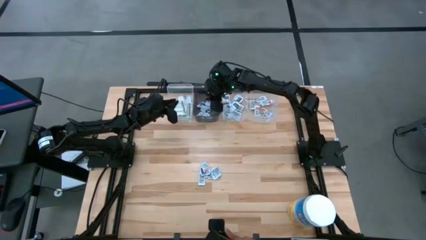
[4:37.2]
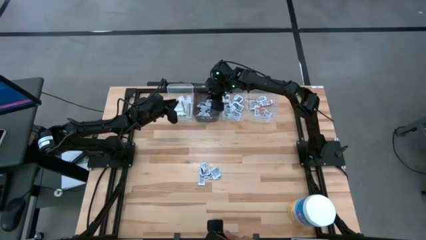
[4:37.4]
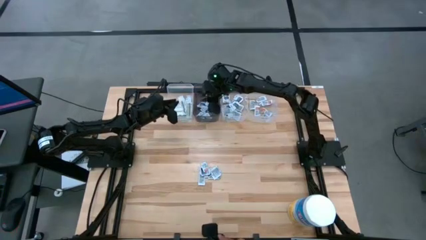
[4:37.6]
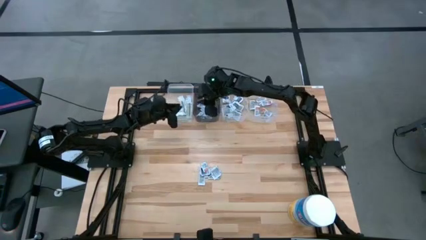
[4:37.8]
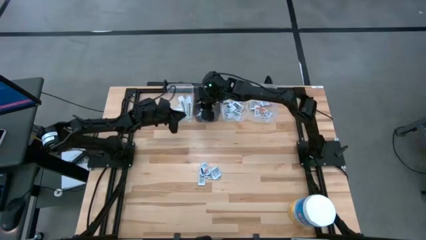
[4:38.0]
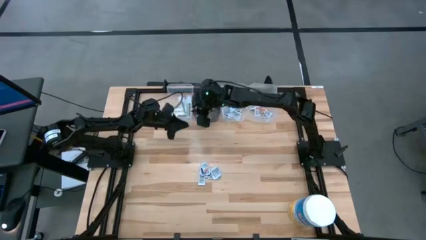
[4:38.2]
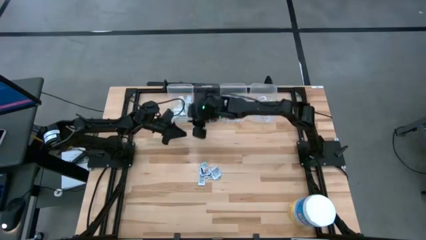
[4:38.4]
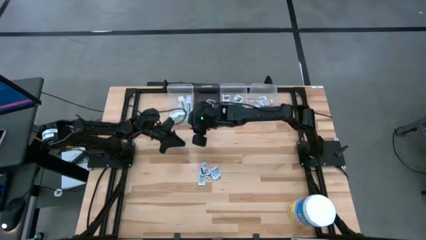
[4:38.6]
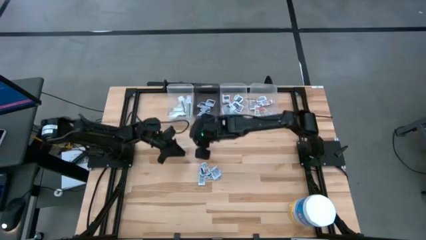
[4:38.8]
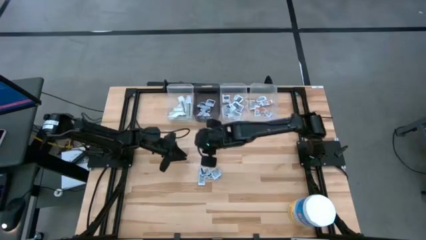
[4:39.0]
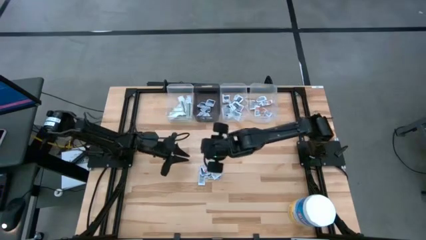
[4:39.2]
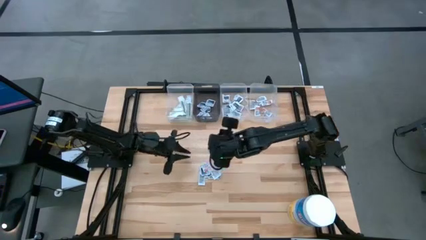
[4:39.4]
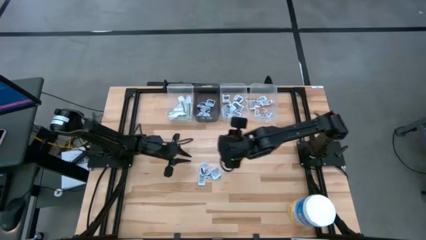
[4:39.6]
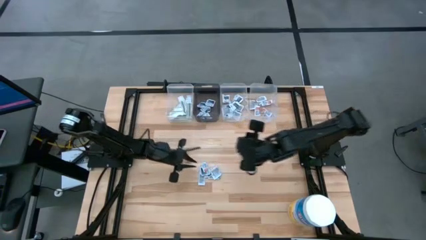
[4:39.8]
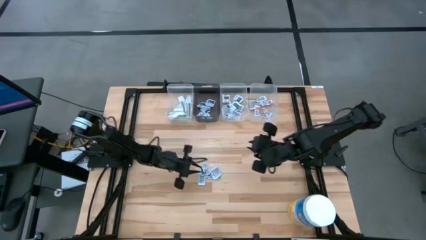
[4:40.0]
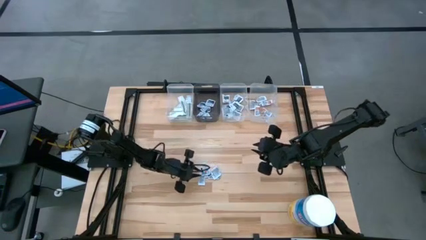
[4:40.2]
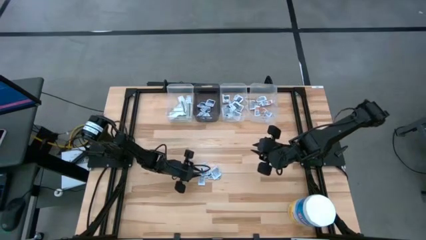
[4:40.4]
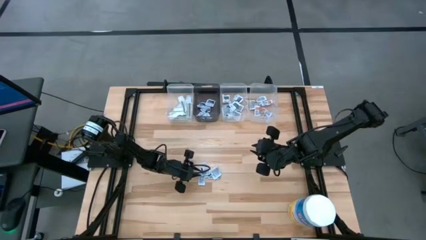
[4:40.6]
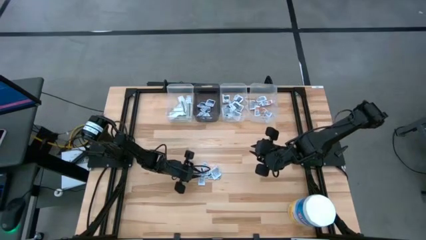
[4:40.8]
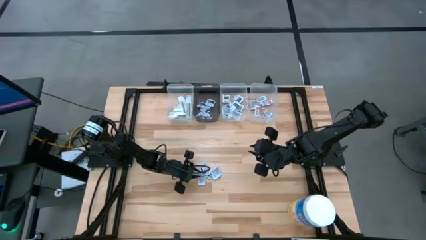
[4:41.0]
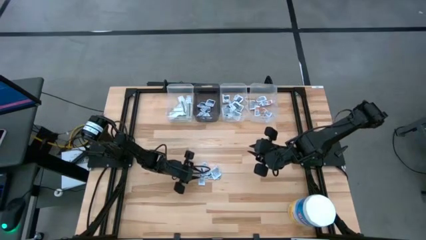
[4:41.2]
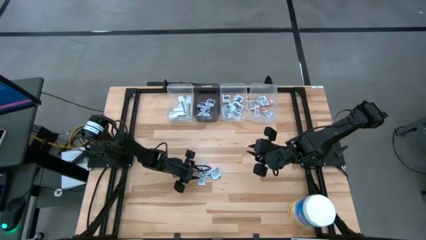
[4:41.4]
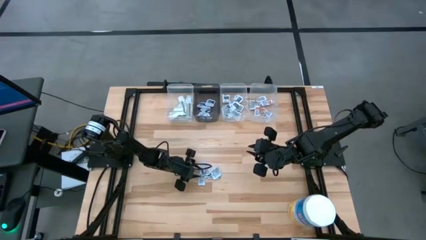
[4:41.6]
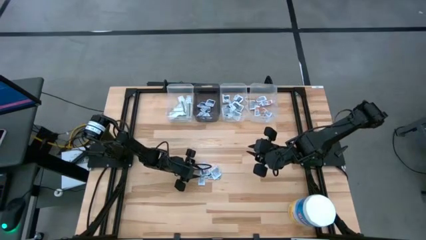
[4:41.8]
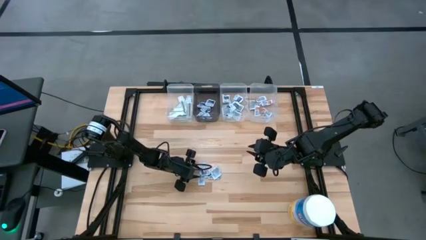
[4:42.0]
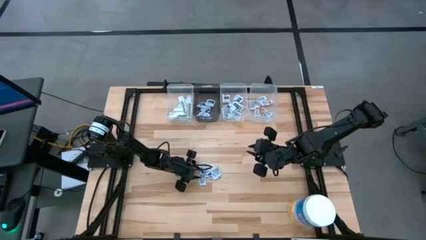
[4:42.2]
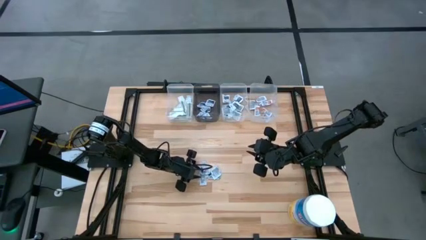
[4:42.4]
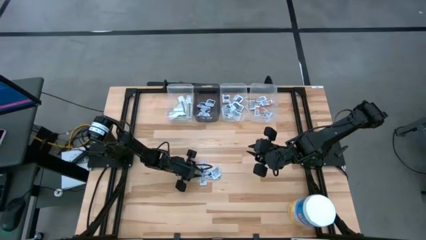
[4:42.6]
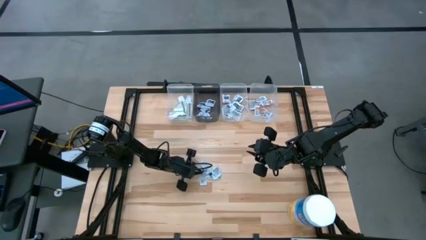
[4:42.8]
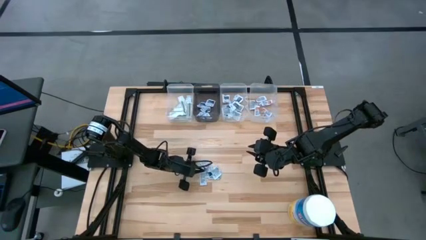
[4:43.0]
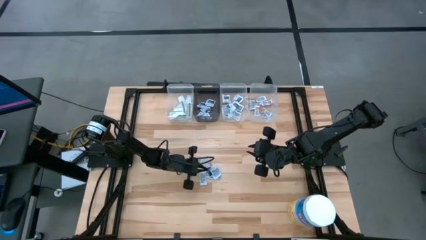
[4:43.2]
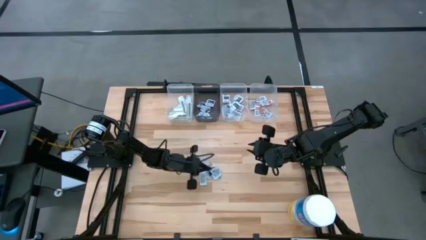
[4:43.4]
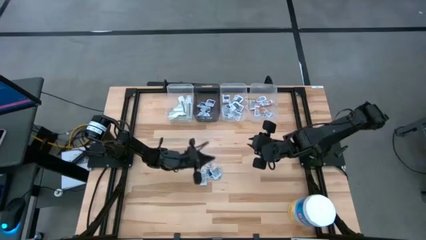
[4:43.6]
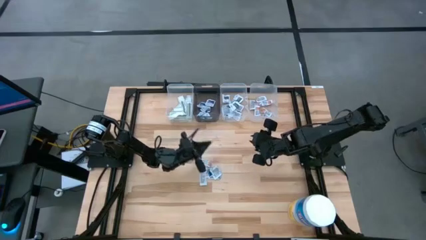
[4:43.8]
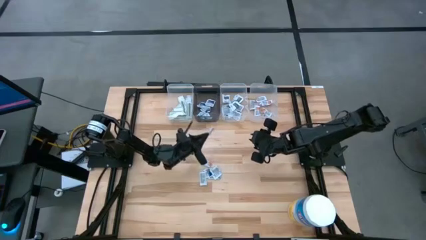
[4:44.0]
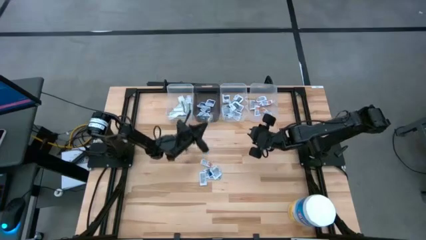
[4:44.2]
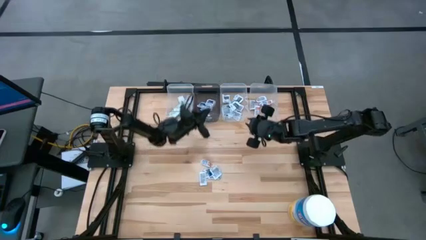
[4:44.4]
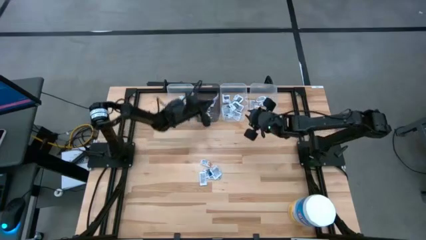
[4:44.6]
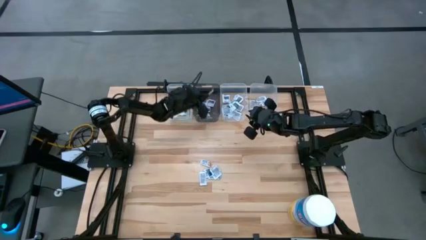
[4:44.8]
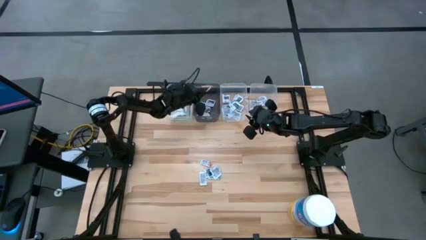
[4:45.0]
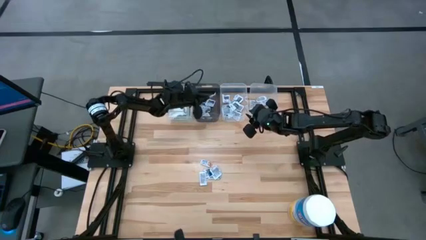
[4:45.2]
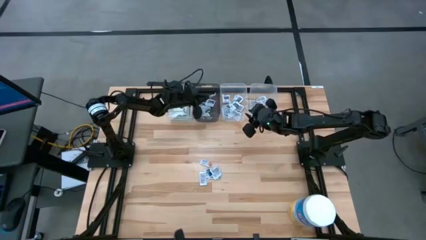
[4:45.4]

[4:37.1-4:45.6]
Task: Pick & Place First Aid Supplies
Put the alcohol pad into the black bin

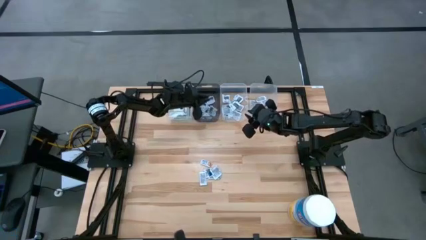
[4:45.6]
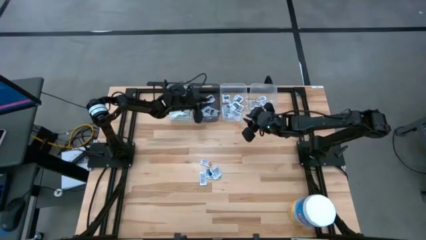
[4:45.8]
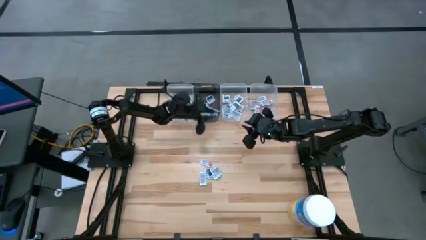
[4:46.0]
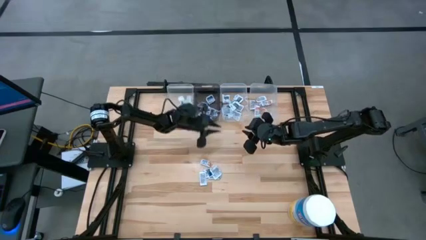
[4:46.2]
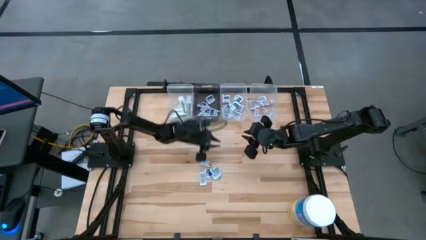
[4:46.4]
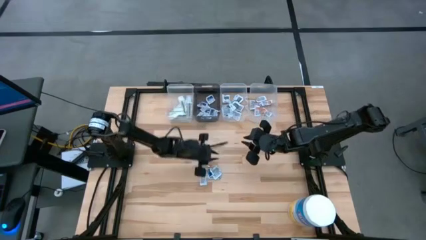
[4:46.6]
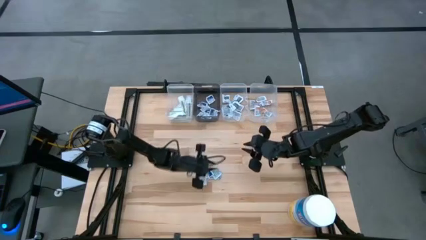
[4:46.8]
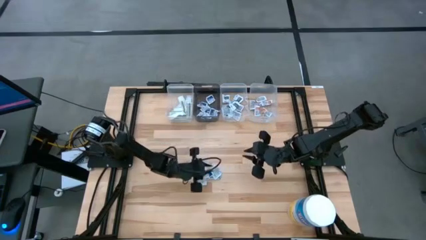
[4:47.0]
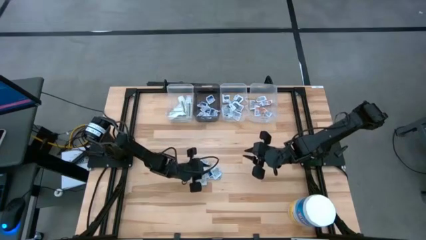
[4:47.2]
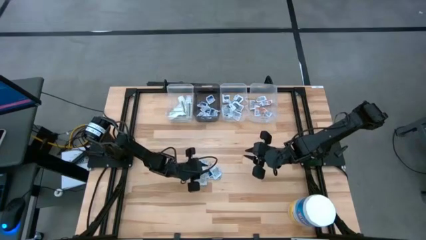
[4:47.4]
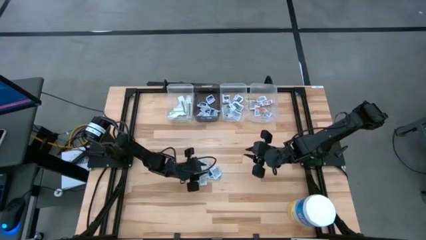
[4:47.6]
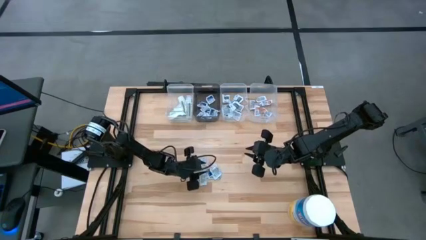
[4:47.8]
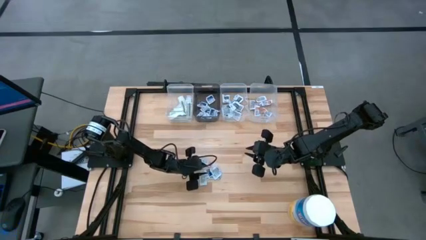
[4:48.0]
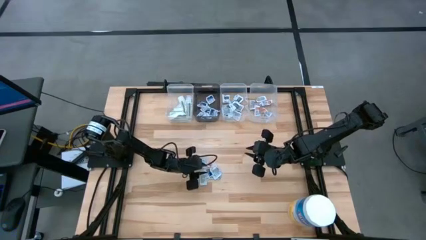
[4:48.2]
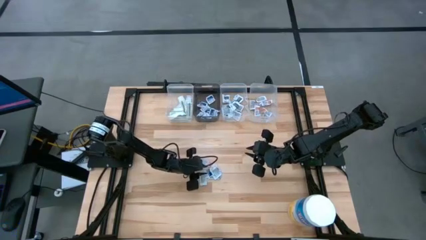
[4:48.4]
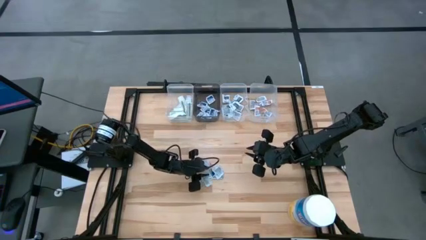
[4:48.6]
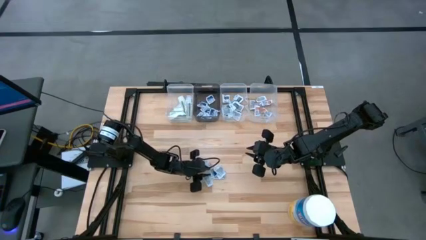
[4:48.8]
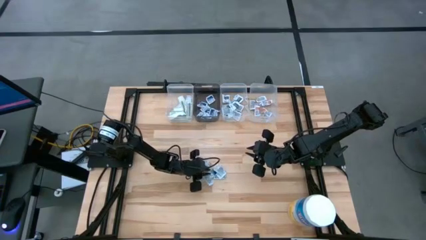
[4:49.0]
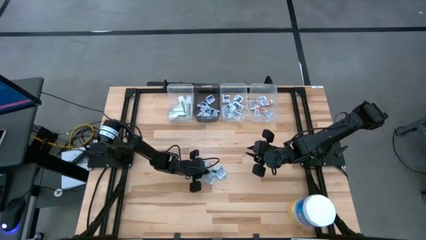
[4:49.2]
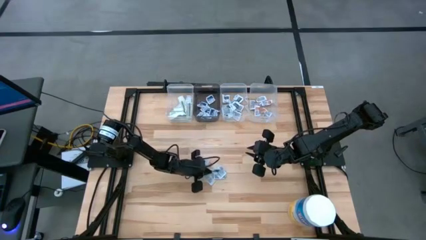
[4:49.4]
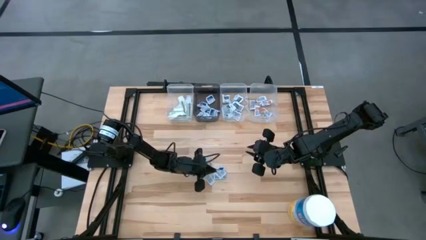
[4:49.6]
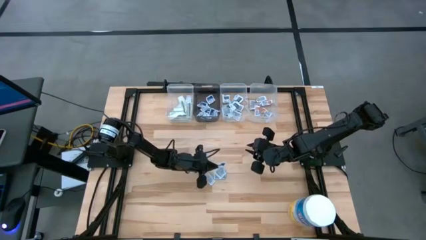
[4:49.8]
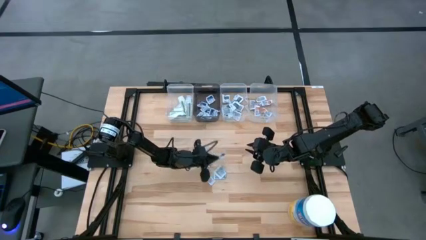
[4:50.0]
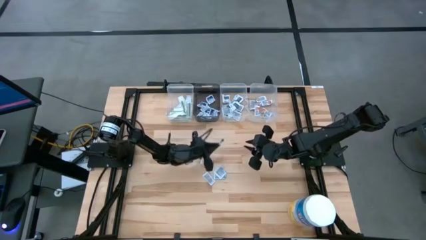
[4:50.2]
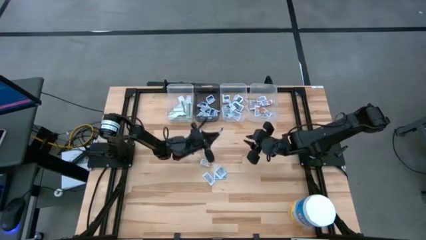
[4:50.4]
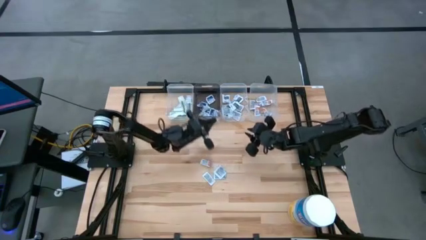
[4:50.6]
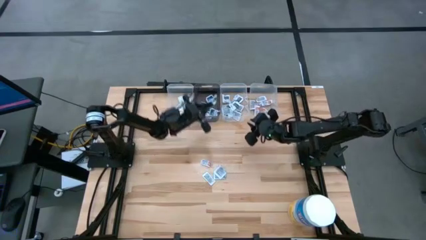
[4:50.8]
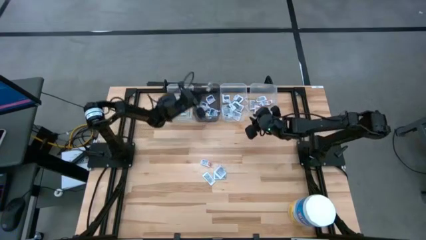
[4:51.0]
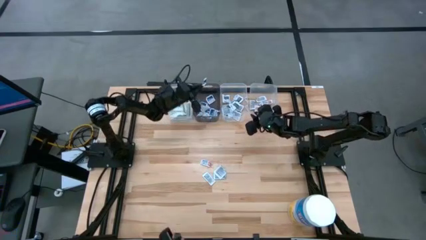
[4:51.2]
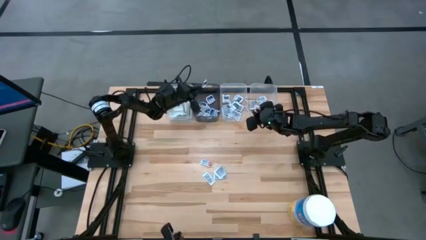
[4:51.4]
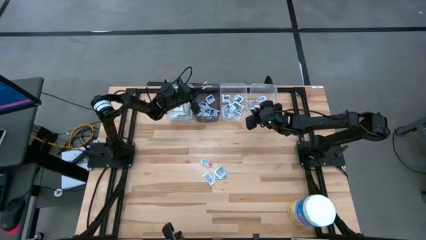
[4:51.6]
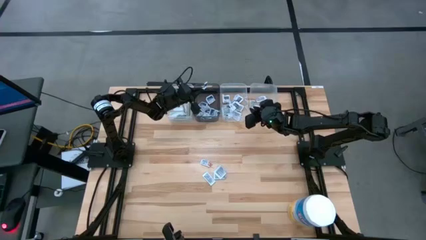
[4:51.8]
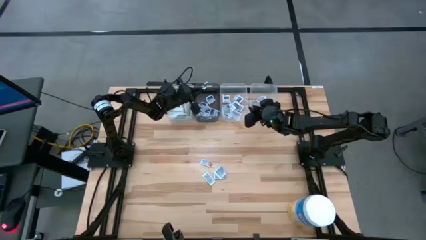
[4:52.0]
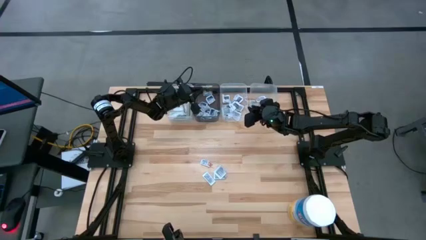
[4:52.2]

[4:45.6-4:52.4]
Put the alcohol pad into the black bin
